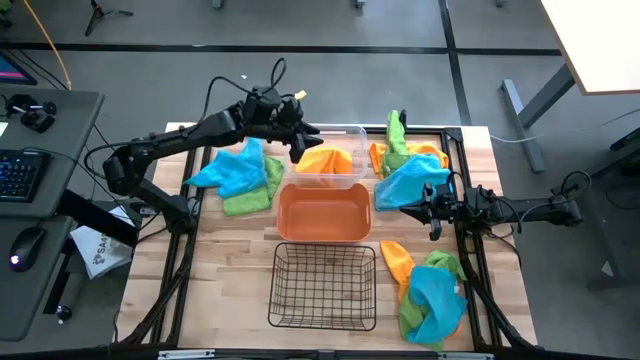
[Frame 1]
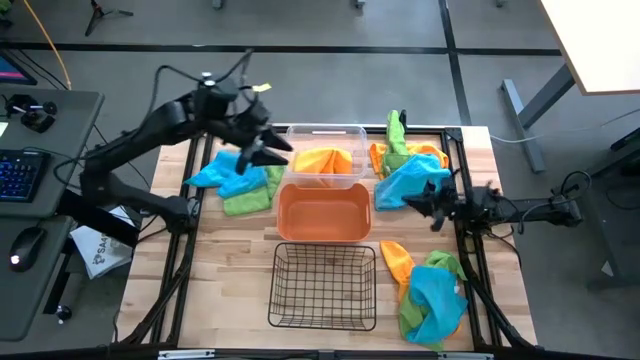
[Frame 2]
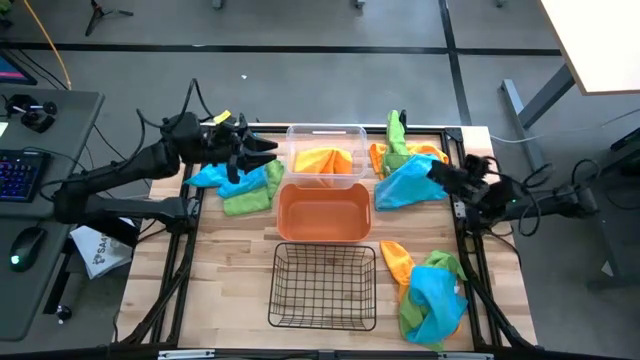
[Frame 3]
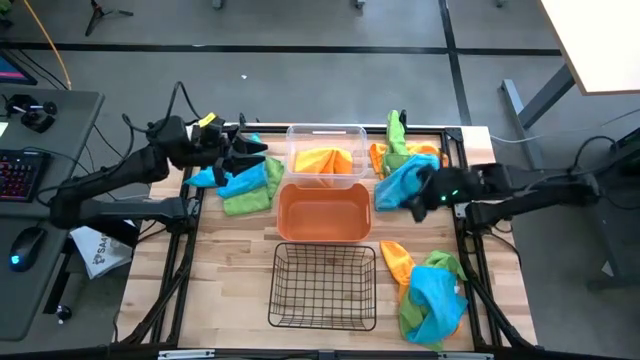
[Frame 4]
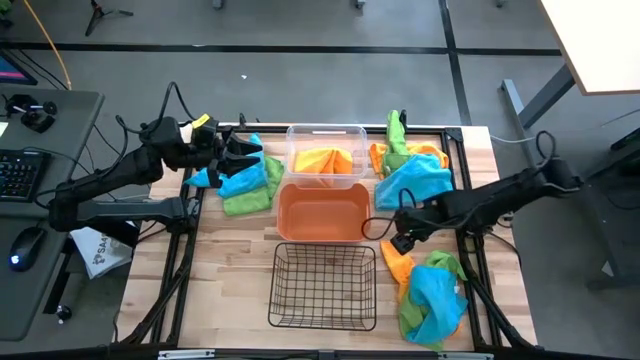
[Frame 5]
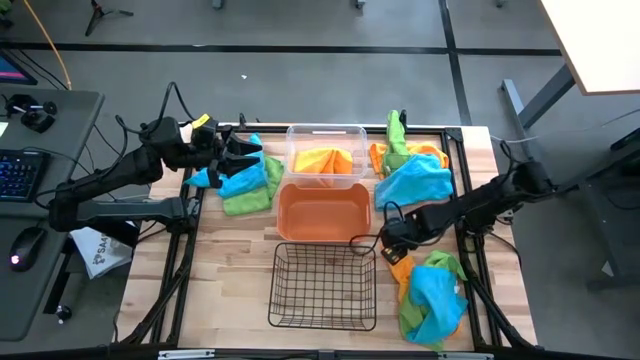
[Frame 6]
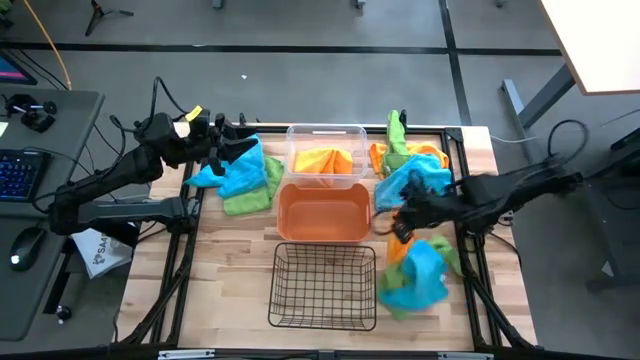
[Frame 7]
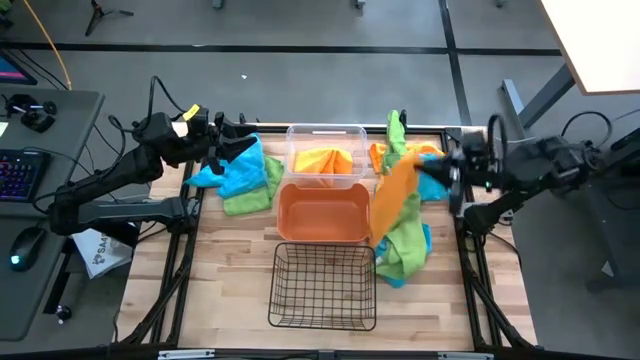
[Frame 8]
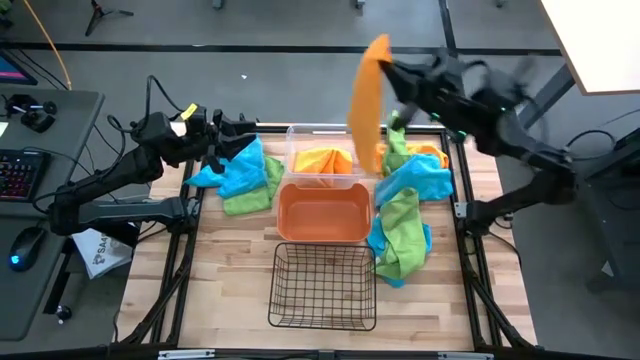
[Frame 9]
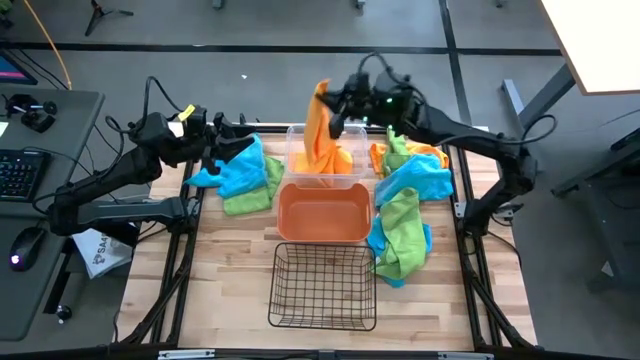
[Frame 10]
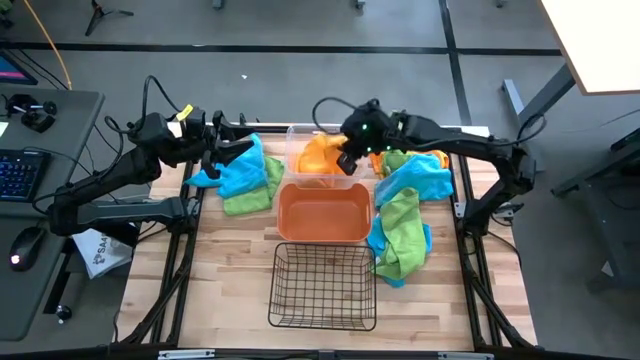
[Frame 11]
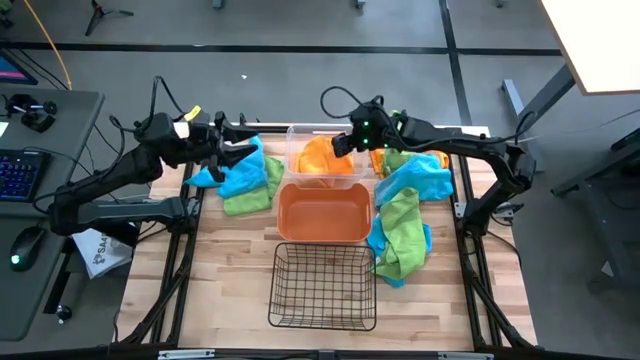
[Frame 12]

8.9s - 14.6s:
Task: Sort microfiber towel by color & place in baskets
Put the bottom orange towel into the transparent bin

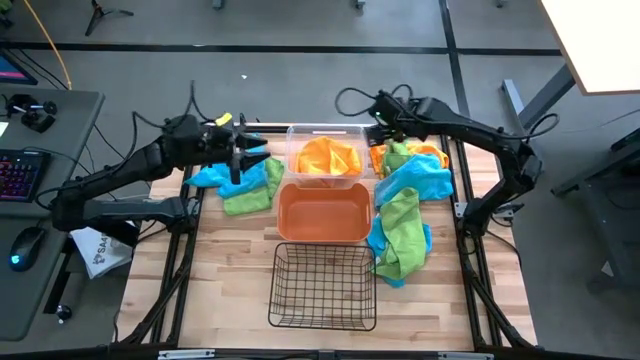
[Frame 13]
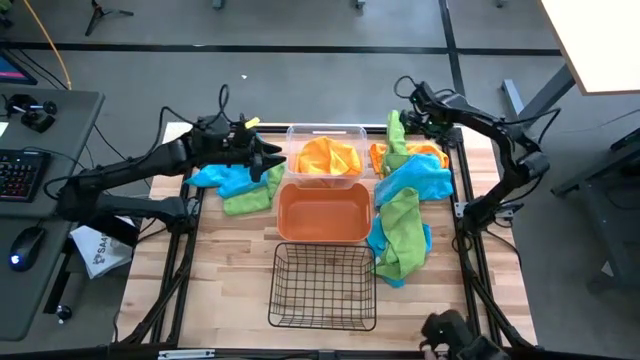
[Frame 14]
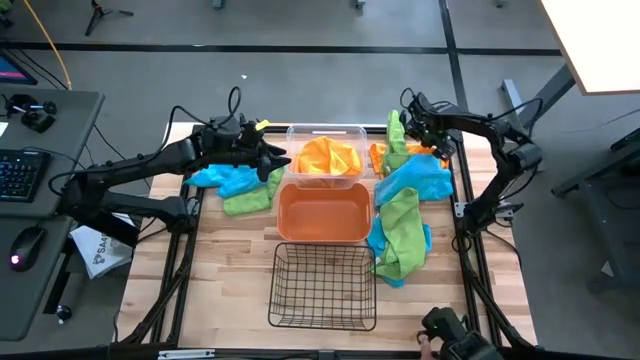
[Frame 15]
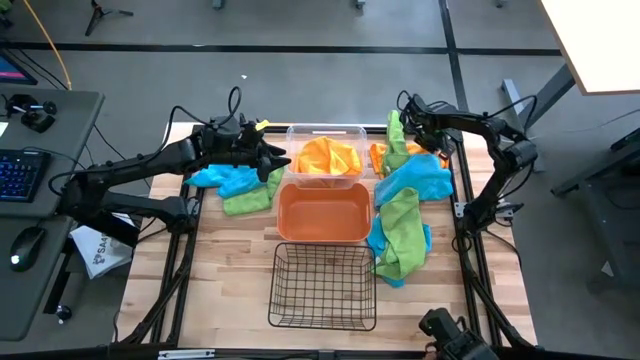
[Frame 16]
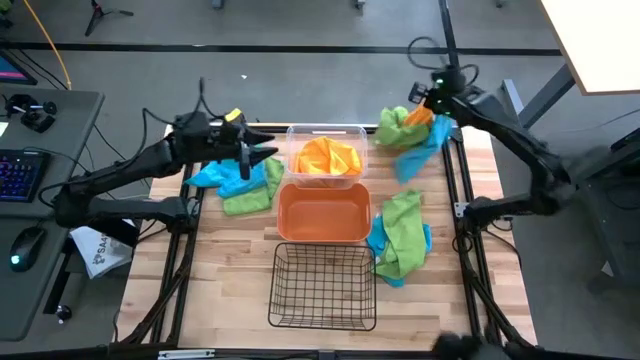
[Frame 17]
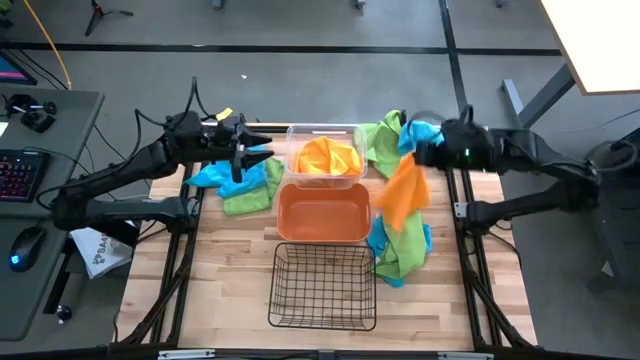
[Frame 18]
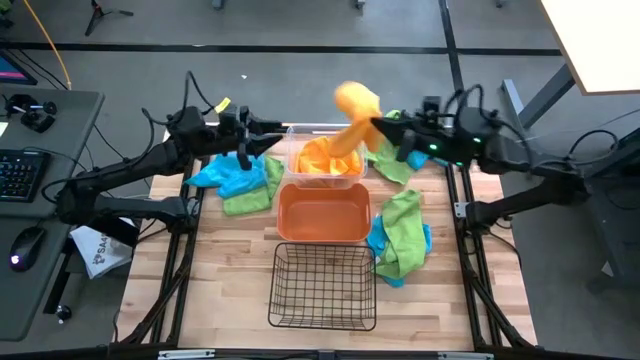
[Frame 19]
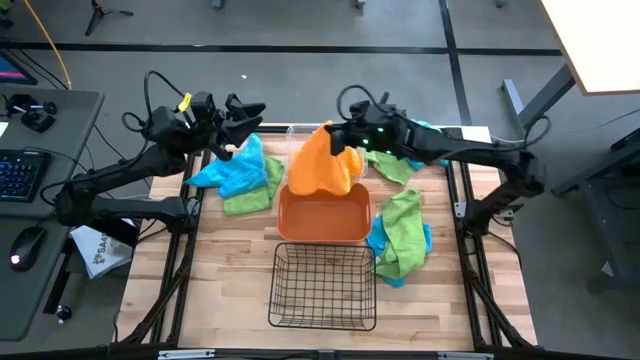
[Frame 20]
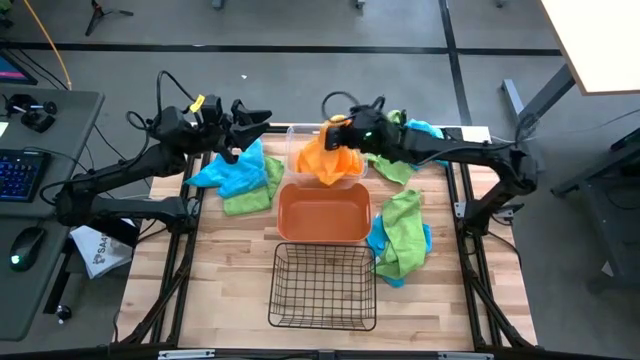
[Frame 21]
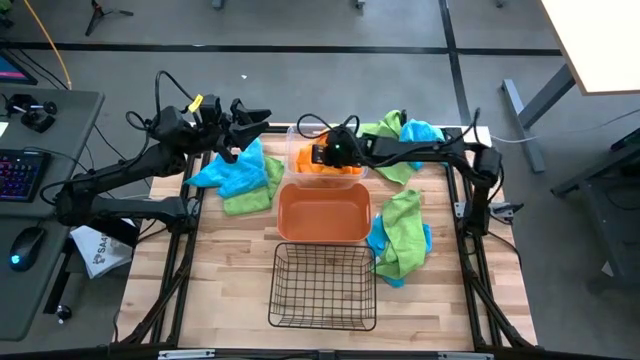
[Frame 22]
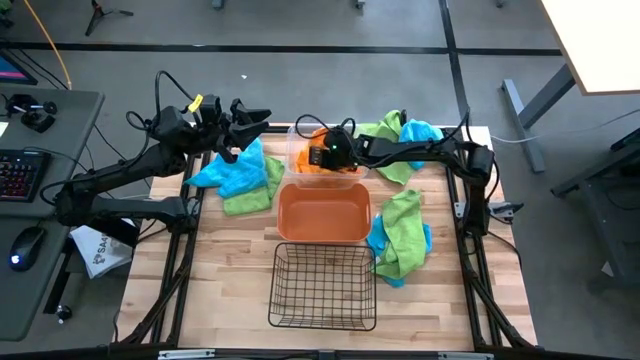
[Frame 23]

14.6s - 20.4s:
Put the orange towel into the transparent bin

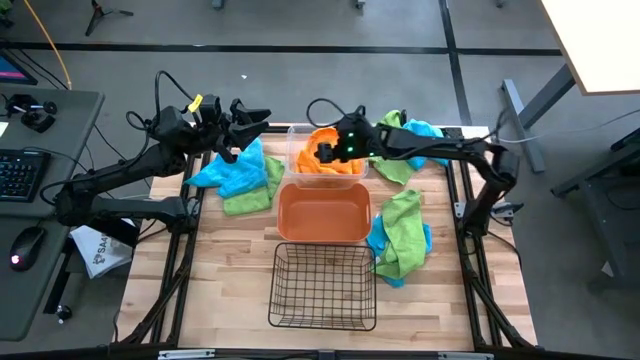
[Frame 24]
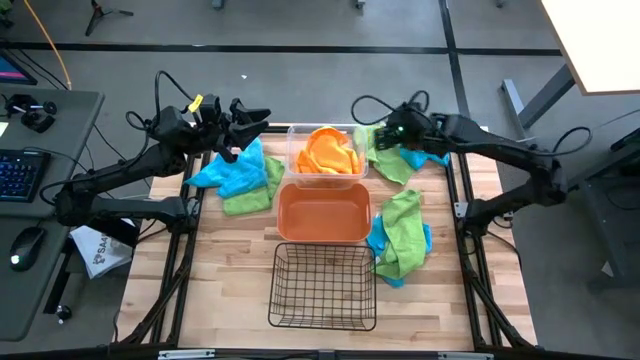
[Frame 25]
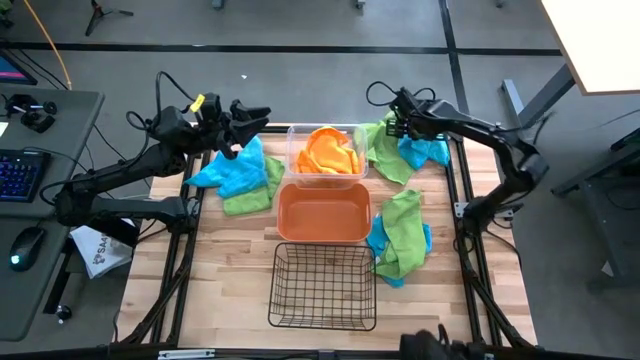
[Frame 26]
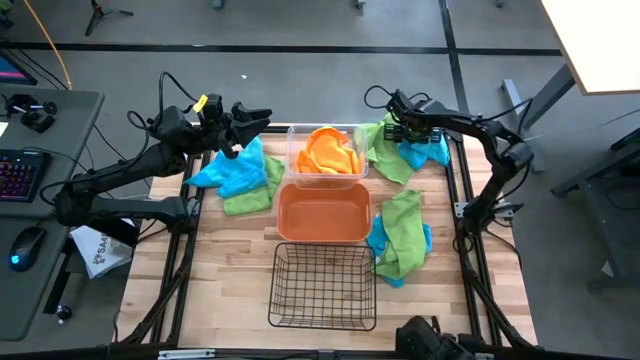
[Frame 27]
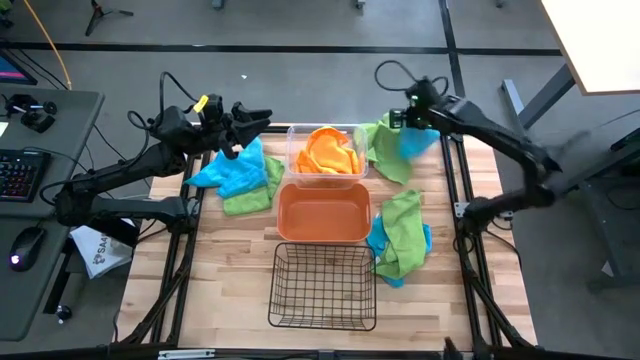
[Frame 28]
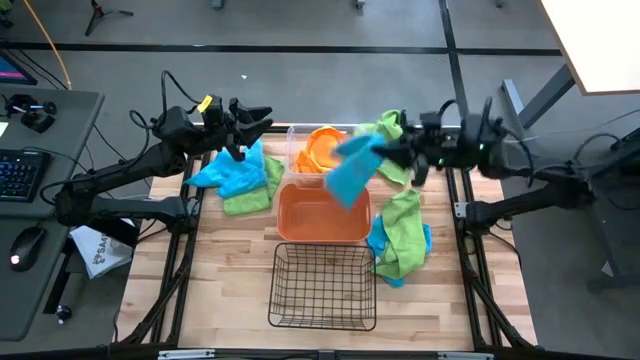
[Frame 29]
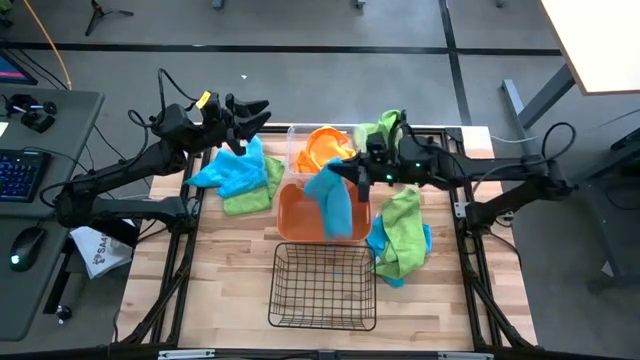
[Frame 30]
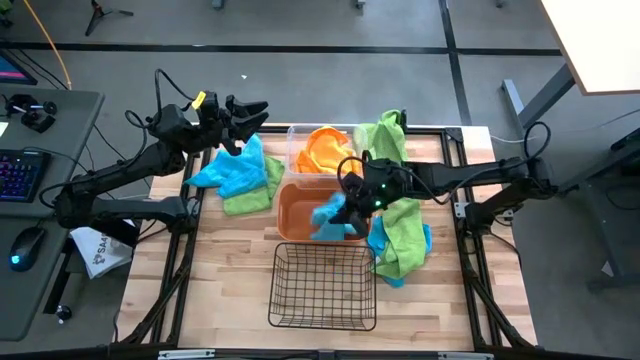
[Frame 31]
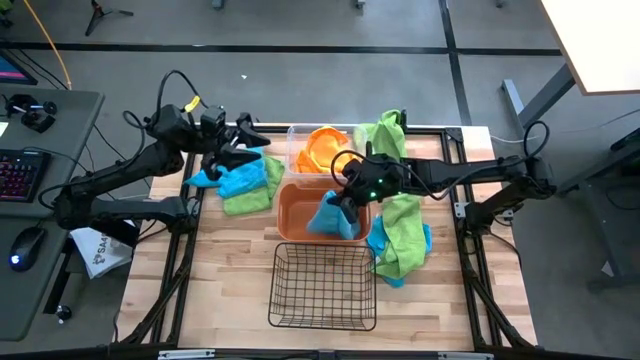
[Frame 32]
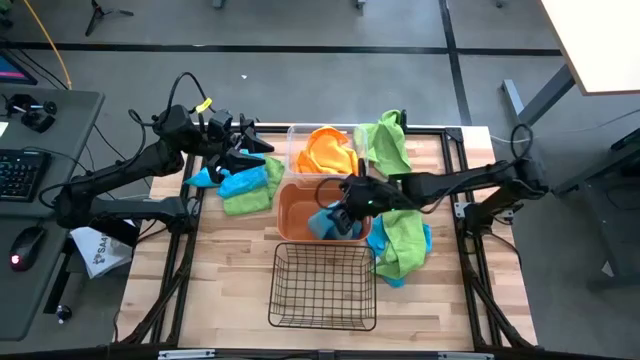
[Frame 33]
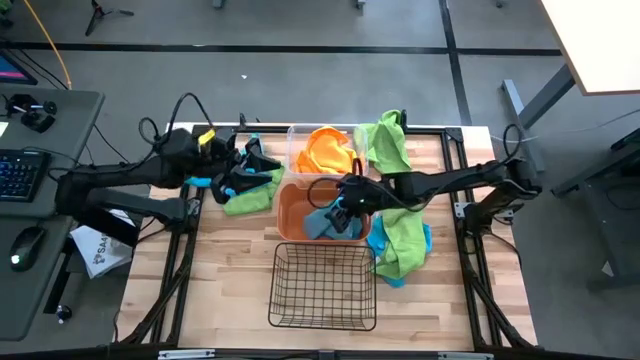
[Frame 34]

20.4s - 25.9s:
Put the top right blue towel into the orange bin

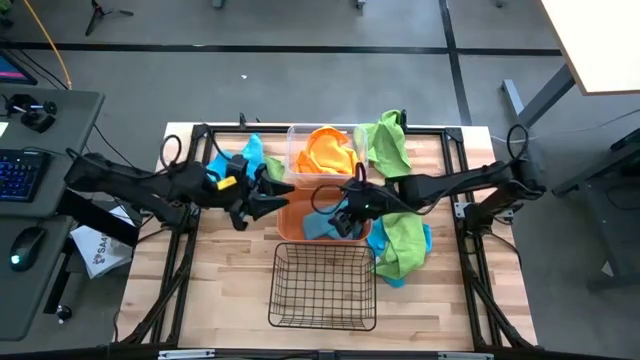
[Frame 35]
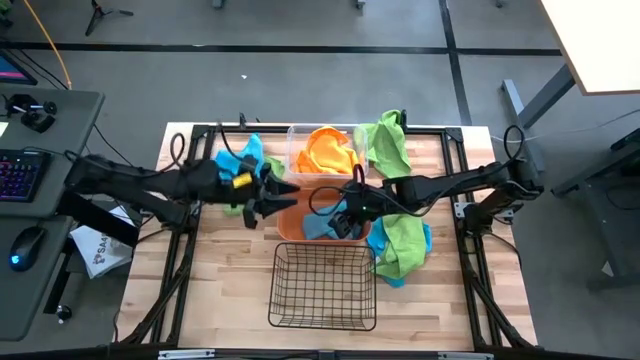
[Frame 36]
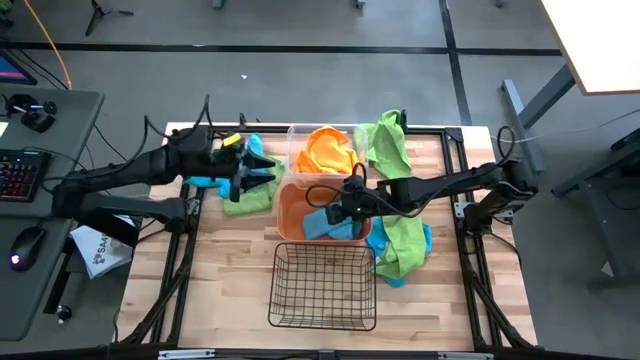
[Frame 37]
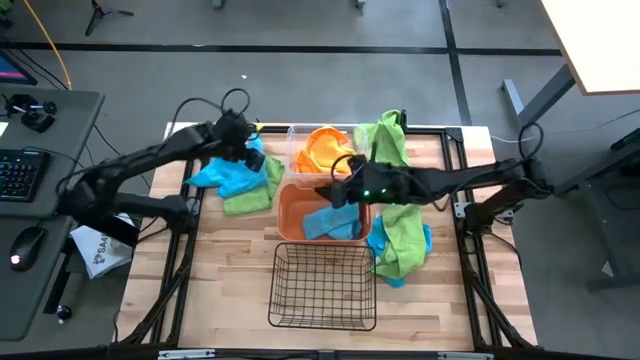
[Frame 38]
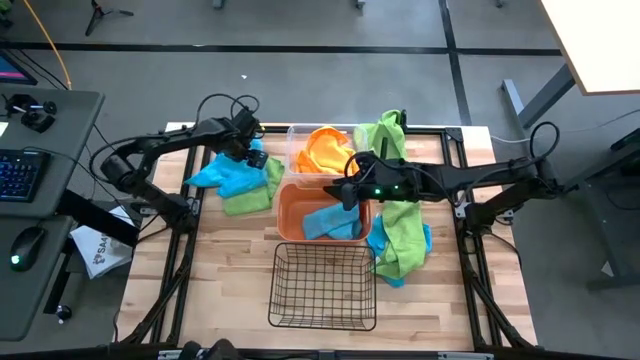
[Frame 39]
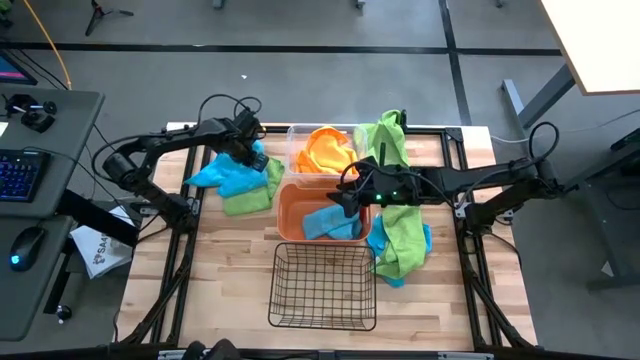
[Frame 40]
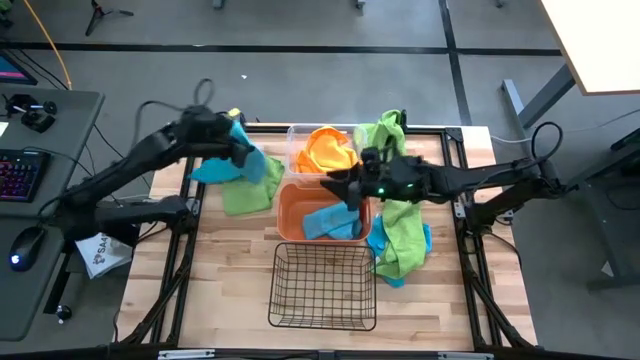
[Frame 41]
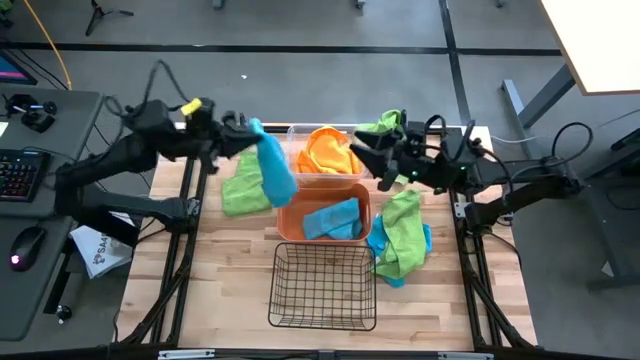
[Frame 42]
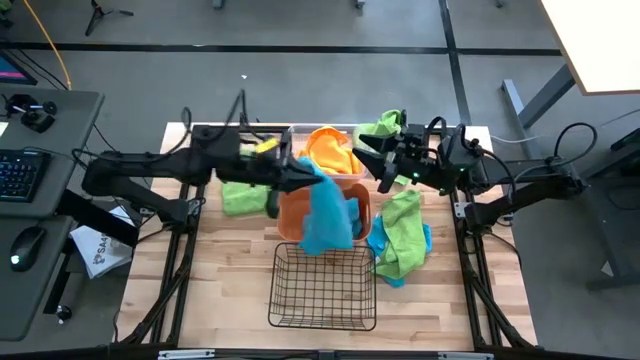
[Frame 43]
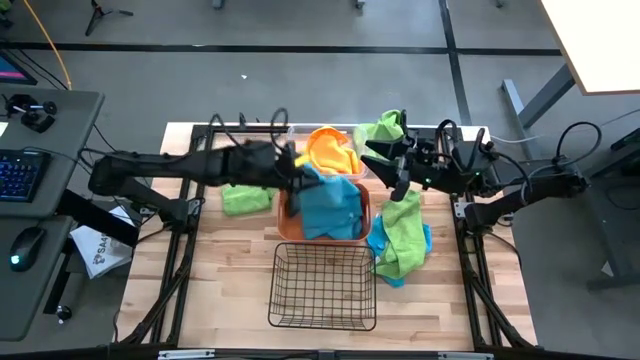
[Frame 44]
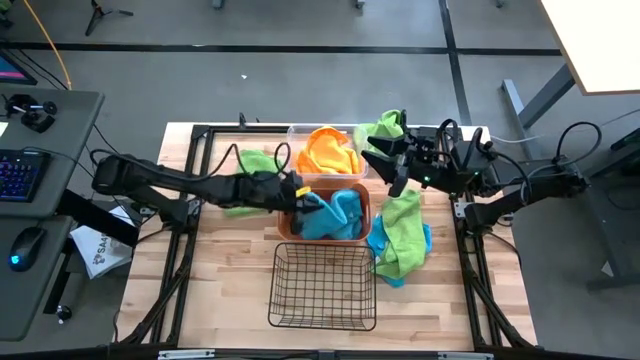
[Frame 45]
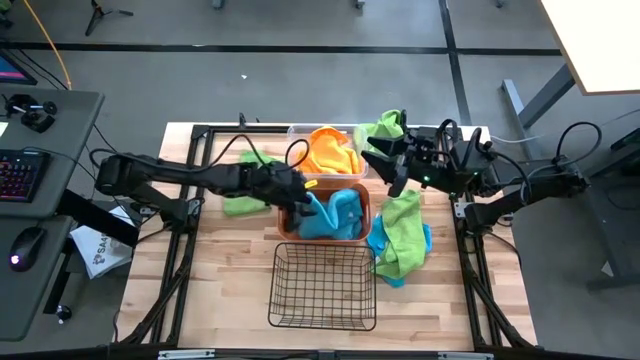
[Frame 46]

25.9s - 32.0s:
Put the left blue towel into the orange bin
